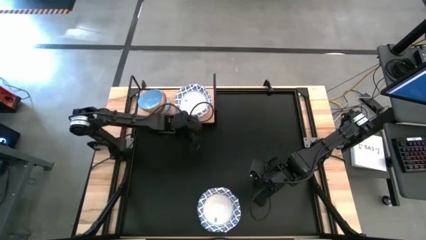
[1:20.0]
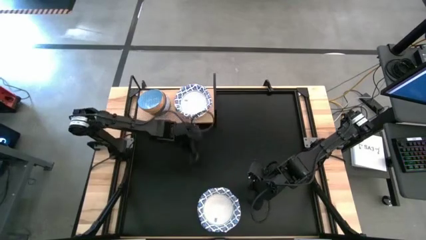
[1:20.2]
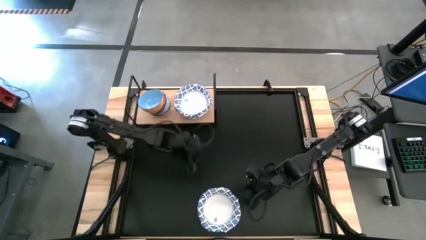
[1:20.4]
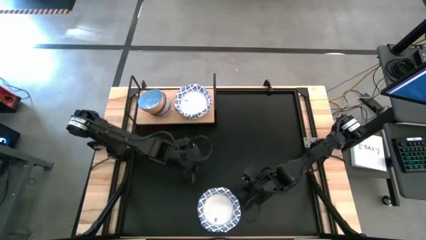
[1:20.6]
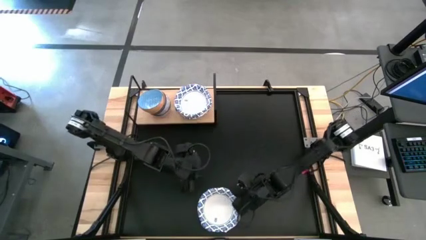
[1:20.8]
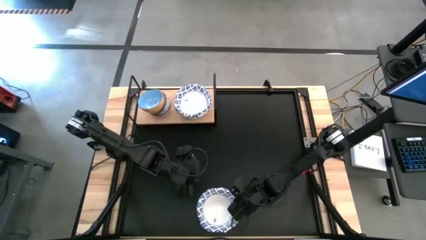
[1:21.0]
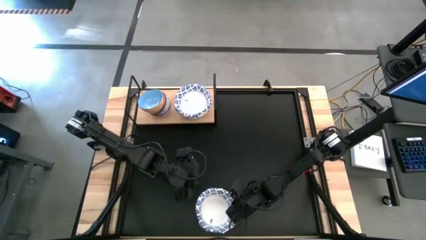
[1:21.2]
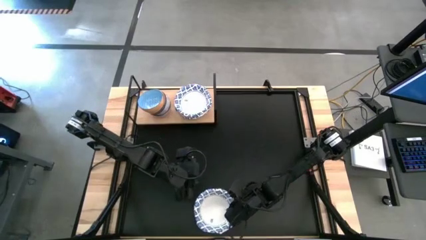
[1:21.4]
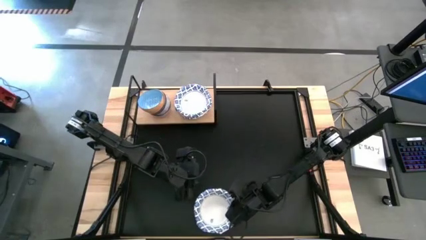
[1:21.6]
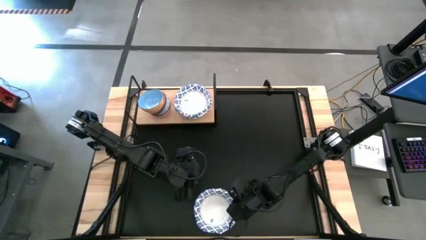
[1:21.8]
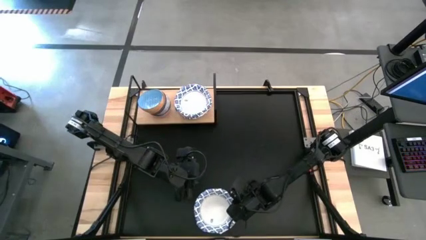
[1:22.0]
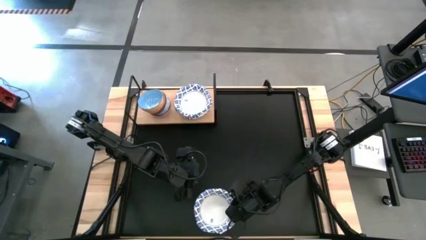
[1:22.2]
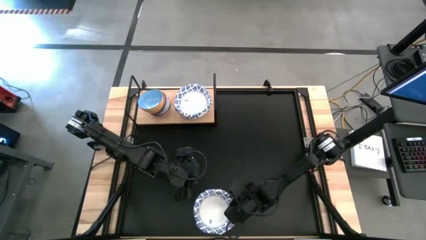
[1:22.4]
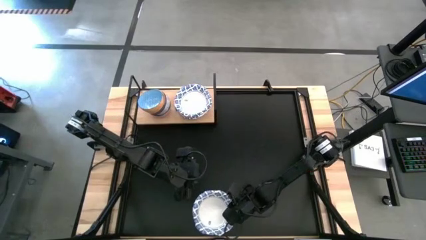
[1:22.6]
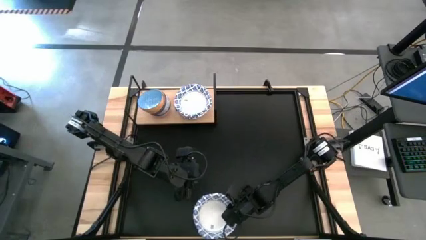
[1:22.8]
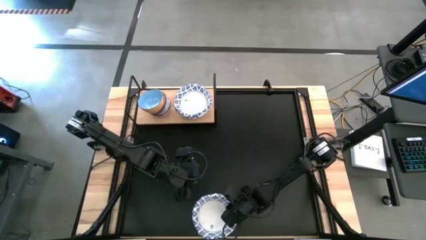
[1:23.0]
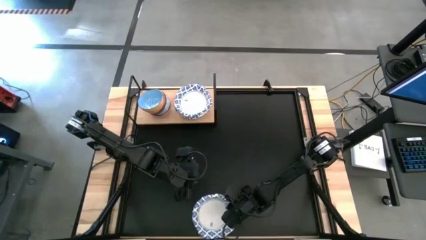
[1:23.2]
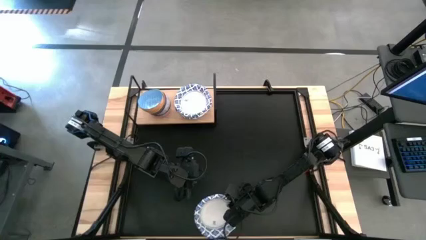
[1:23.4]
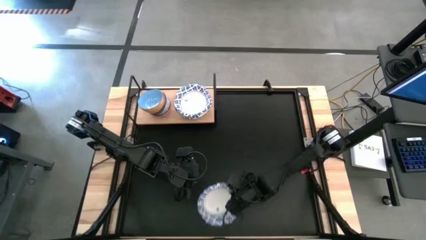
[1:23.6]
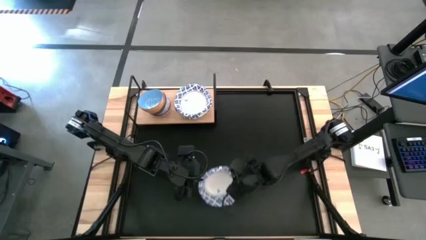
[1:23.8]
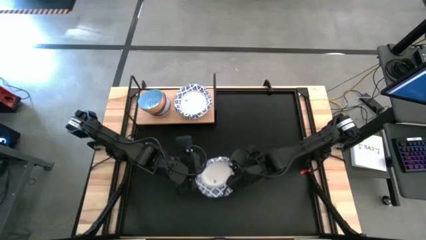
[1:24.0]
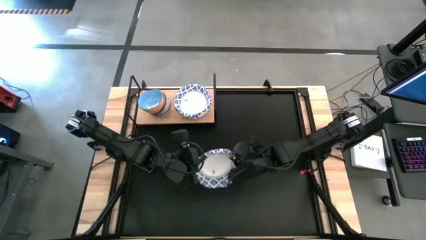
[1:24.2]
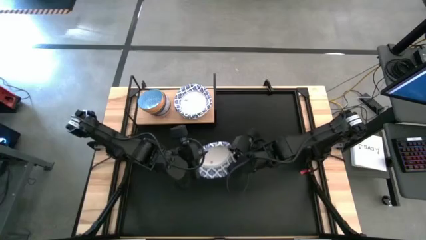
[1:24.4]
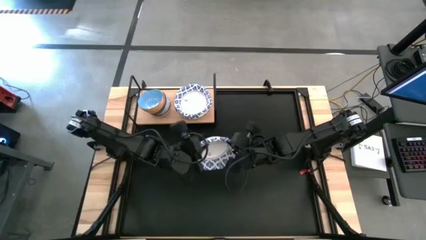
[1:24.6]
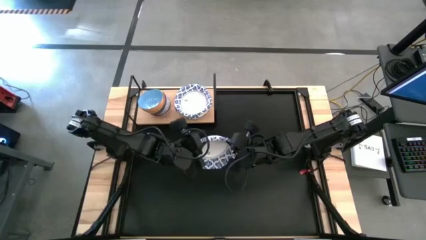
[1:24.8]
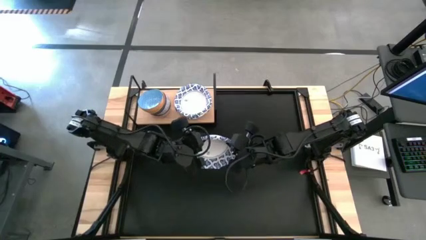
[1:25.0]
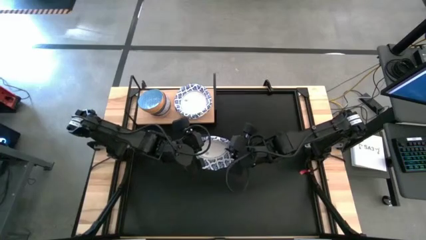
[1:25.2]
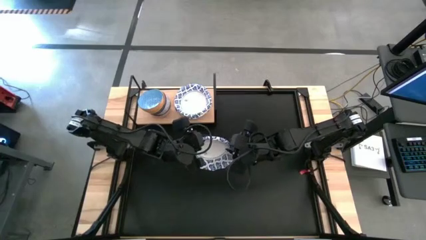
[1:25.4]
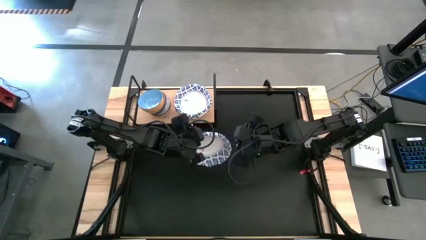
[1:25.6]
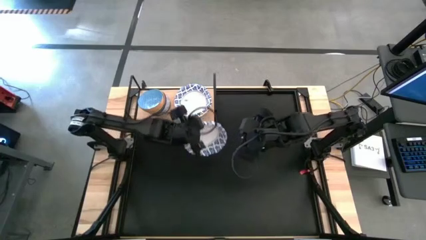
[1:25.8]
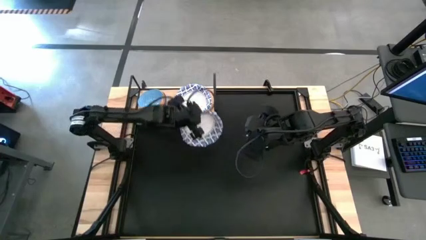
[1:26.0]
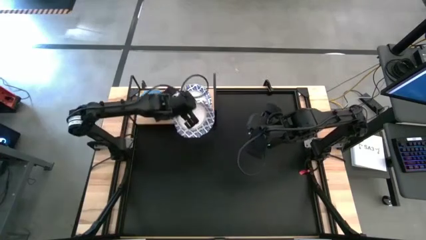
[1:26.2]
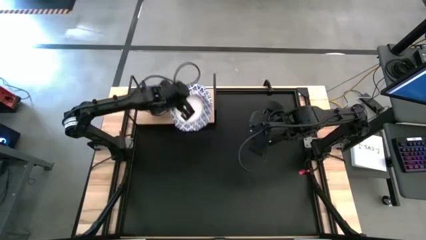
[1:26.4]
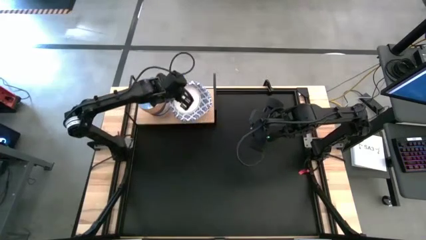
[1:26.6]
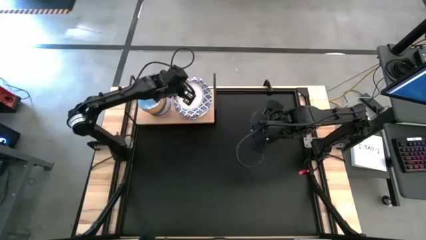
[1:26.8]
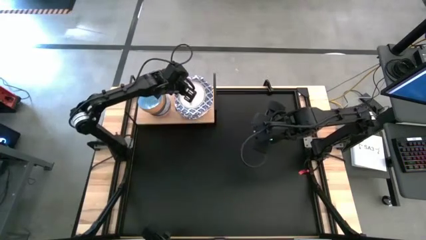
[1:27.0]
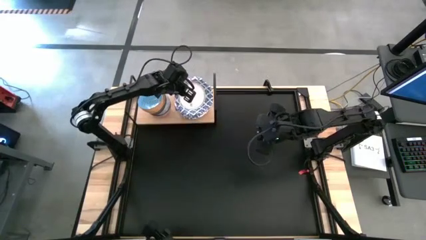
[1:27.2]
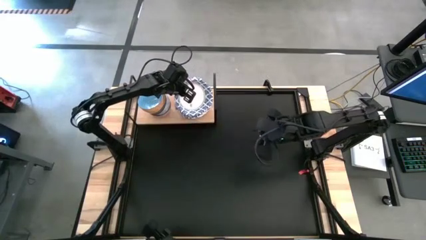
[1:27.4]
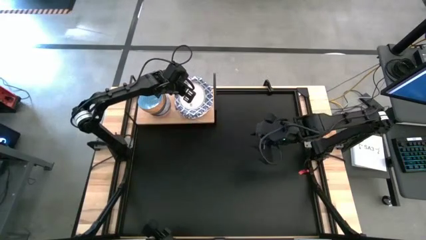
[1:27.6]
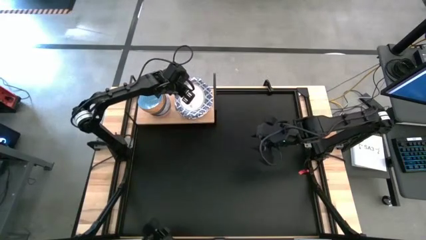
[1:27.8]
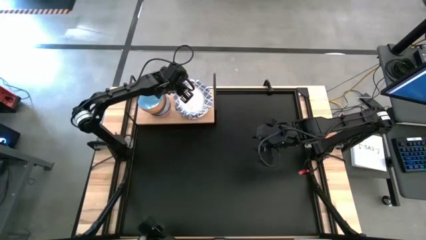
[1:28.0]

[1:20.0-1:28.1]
Task: Place and stack bowls onto a shelf
Stack the white bowl on top of the other white bowl on the shelf

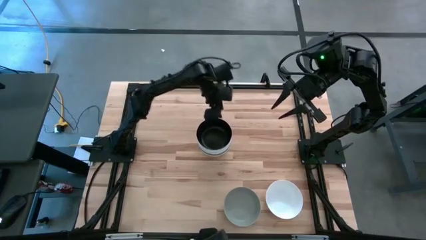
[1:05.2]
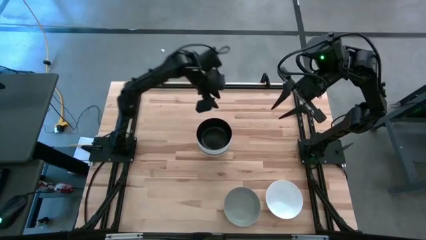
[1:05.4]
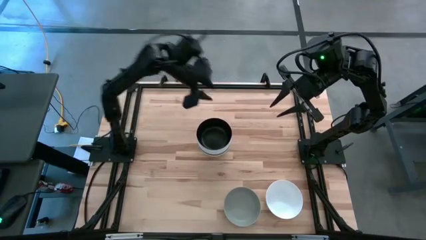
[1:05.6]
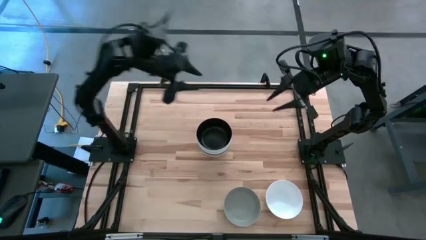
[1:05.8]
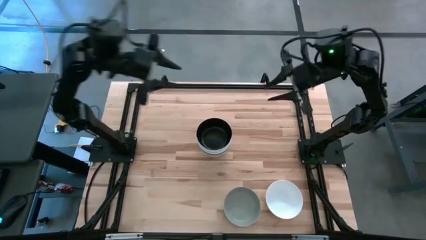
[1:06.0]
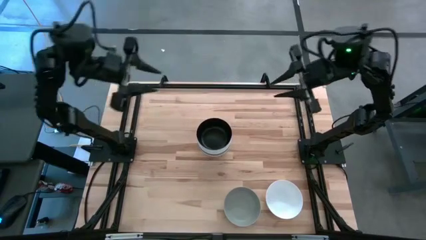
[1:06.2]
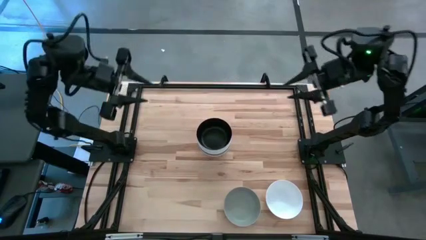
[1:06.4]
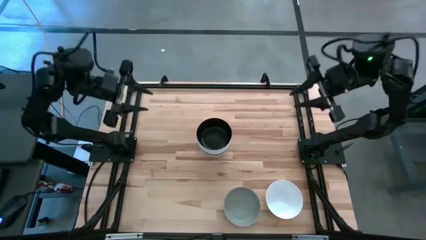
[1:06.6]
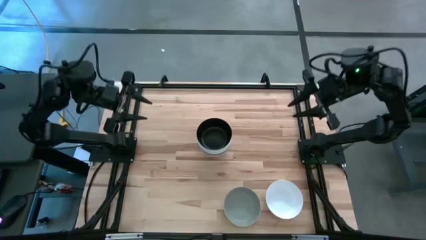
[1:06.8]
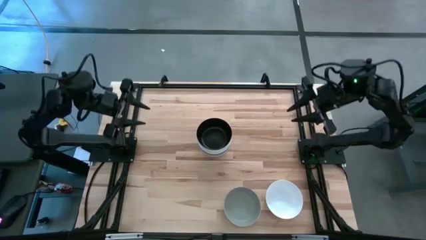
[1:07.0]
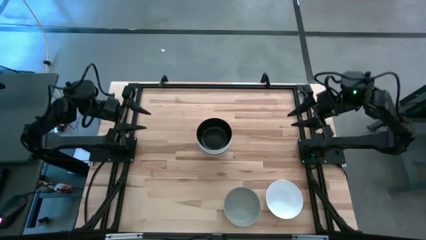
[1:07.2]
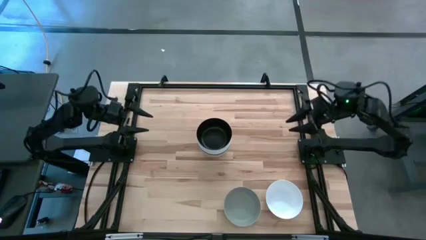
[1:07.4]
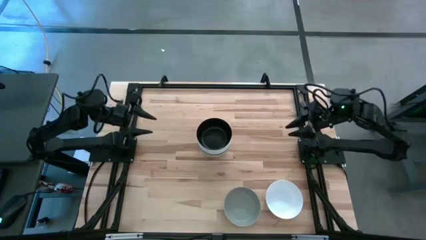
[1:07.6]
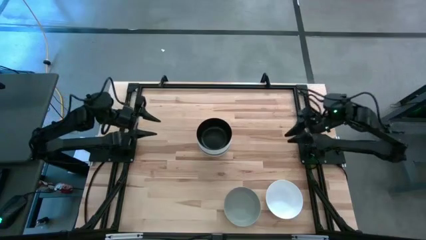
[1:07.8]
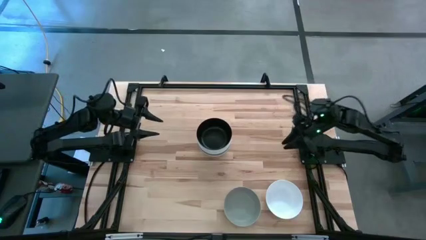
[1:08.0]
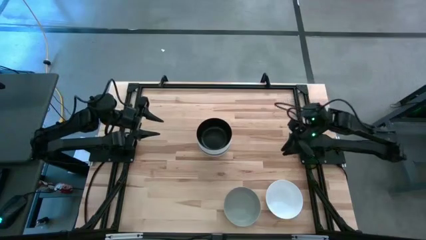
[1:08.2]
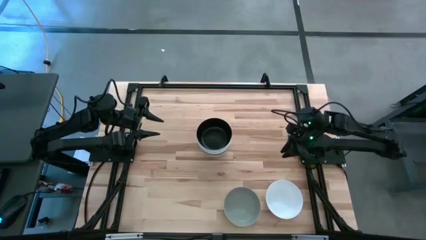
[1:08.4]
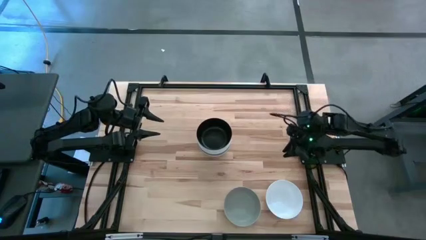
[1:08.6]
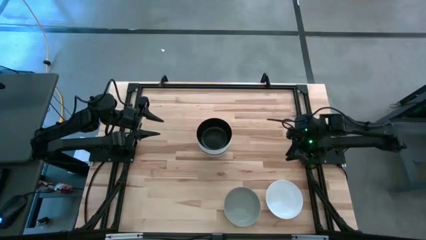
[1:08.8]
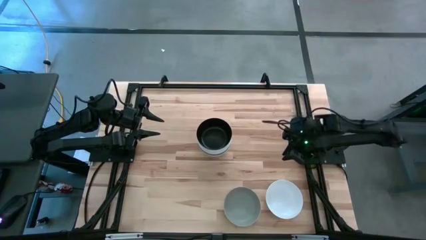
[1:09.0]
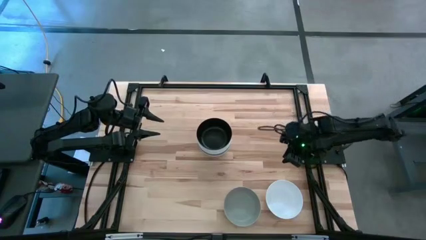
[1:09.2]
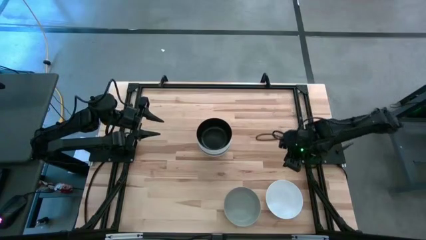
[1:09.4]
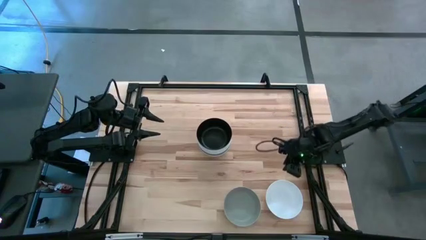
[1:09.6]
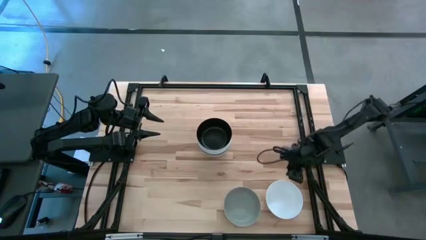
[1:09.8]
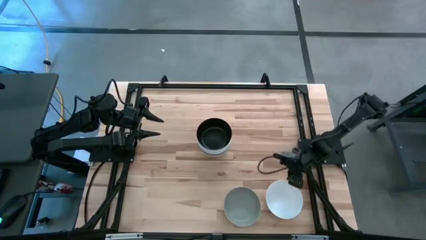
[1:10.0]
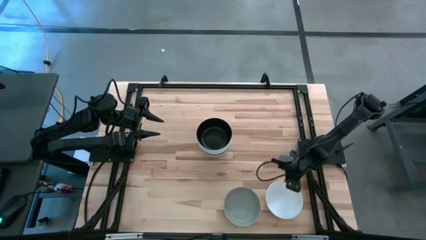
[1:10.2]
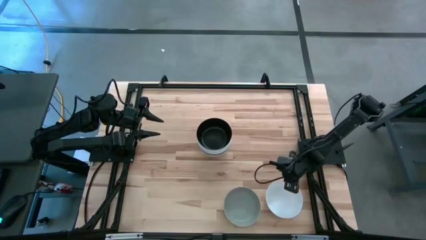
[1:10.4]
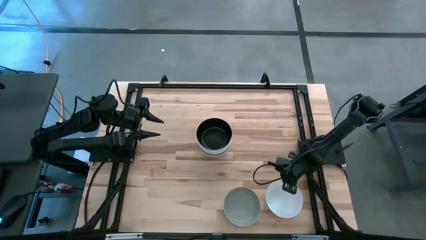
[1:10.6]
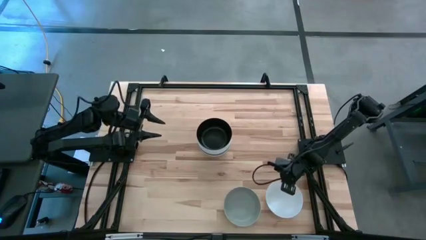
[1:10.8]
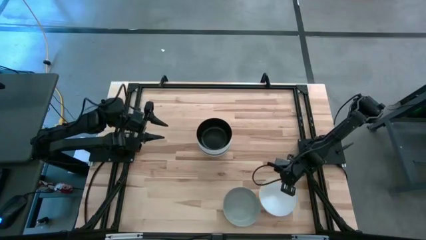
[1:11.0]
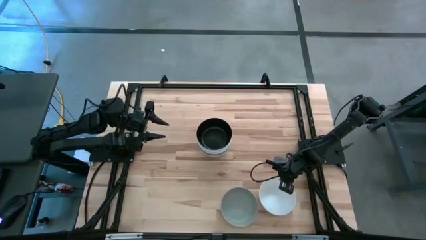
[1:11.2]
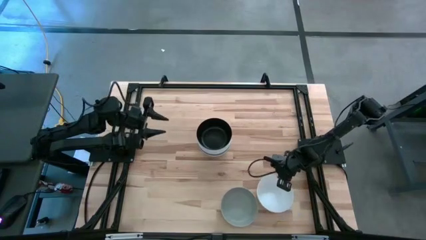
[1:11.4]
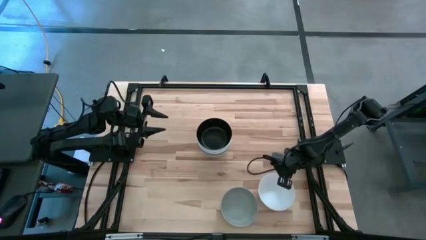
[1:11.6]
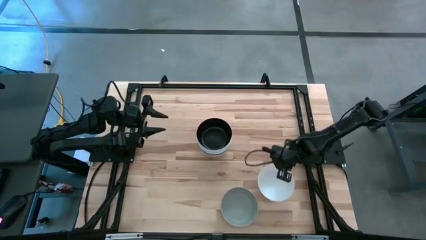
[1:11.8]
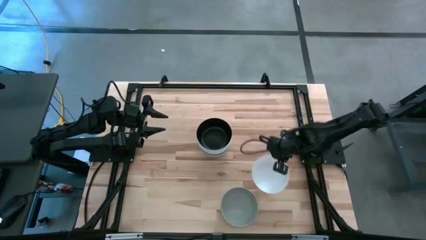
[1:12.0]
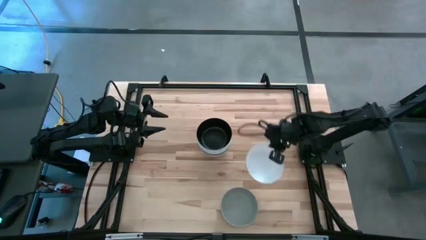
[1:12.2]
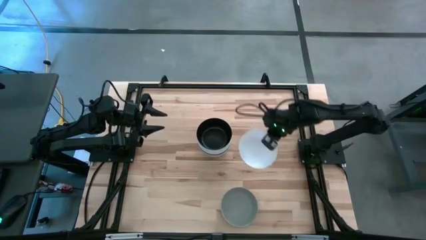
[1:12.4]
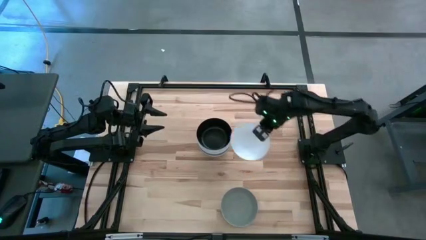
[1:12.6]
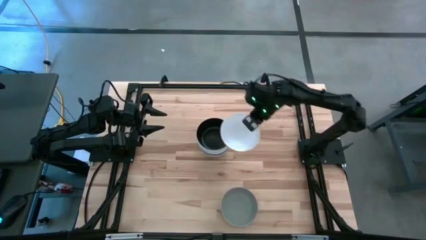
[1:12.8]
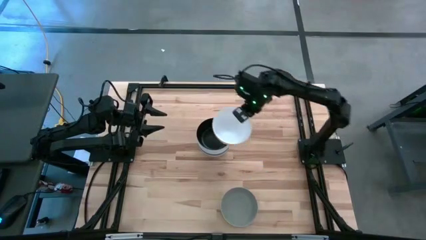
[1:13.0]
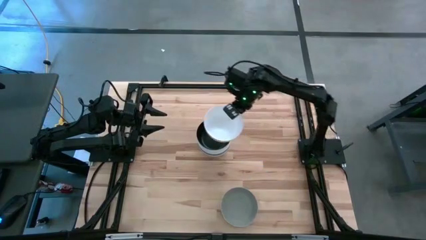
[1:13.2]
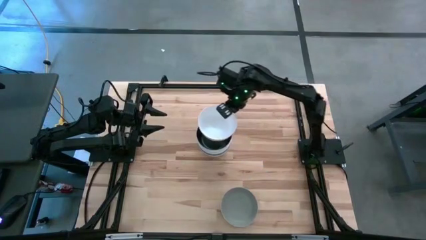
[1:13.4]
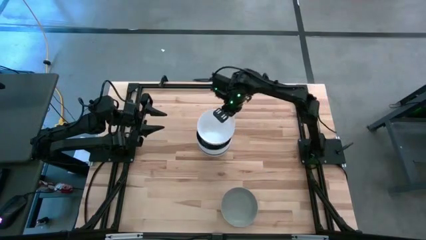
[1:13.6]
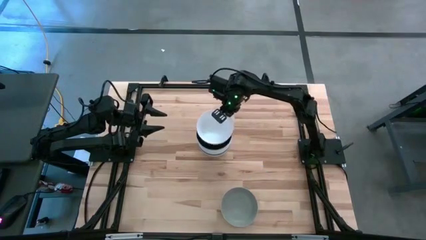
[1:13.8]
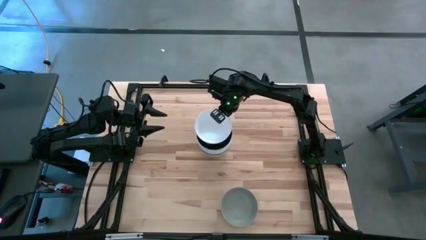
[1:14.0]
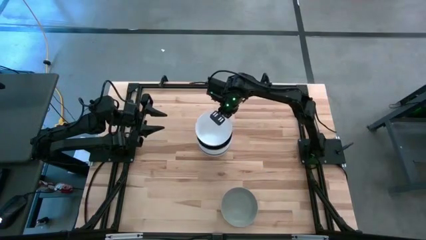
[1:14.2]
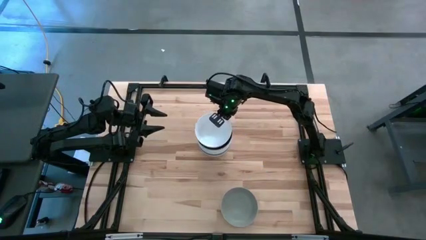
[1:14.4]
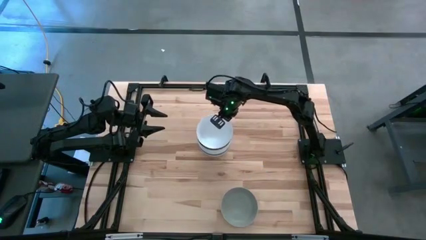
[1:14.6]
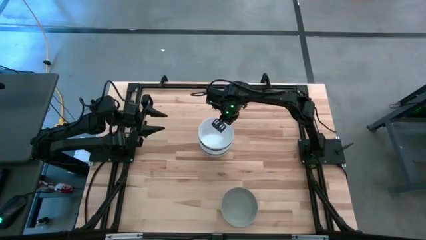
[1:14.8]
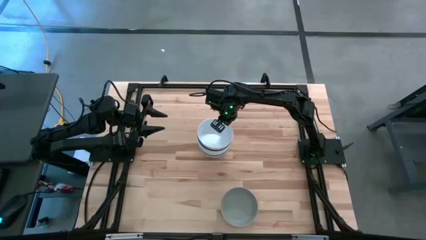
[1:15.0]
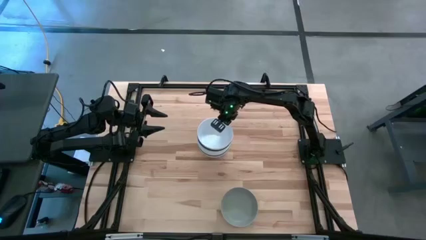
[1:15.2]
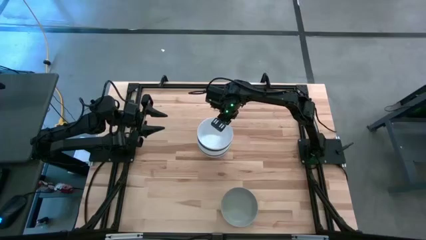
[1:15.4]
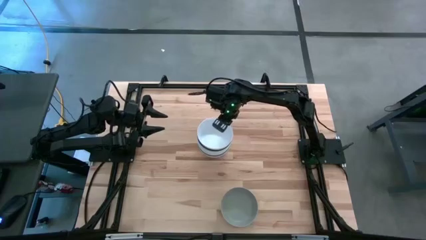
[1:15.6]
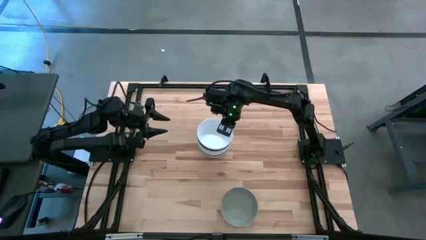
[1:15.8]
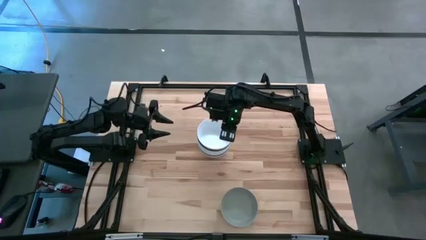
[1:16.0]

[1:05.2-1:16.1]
Task: Nest bowls inside each other
Stack the white bowl on top of the black bowl
